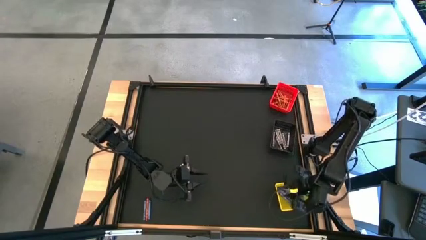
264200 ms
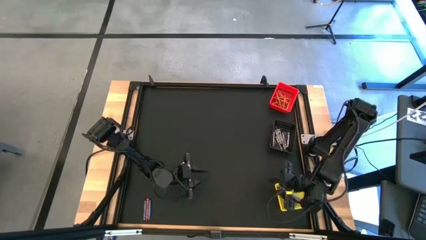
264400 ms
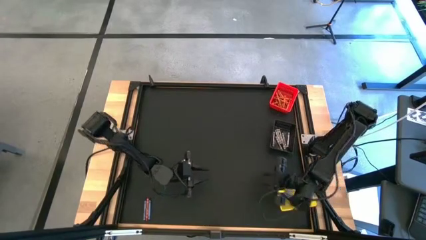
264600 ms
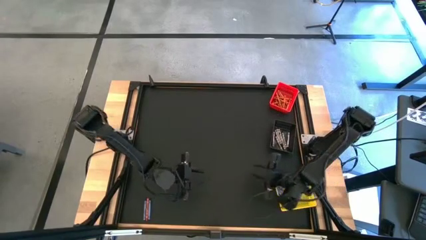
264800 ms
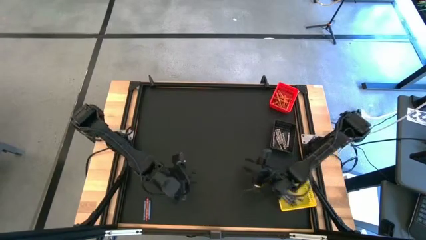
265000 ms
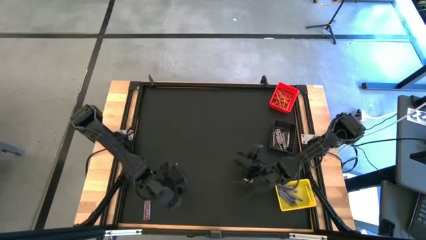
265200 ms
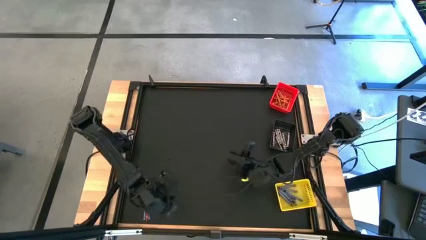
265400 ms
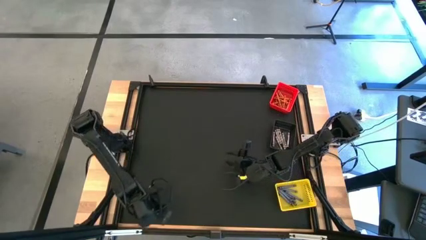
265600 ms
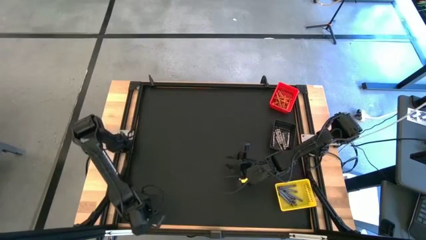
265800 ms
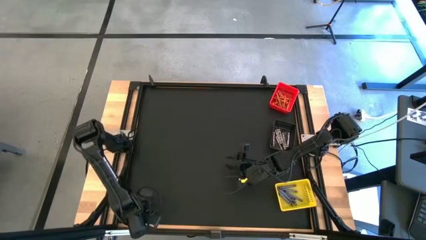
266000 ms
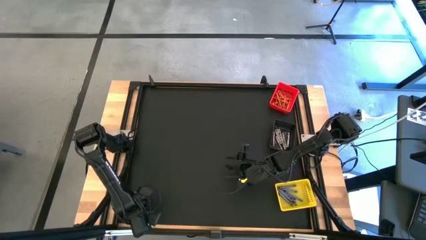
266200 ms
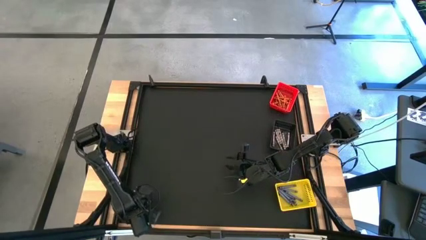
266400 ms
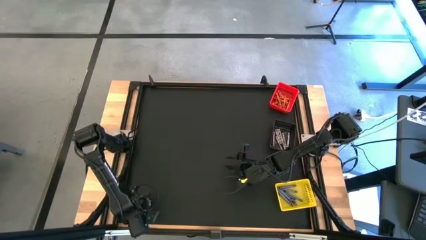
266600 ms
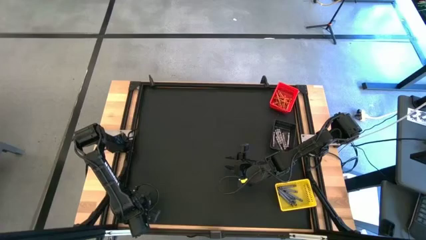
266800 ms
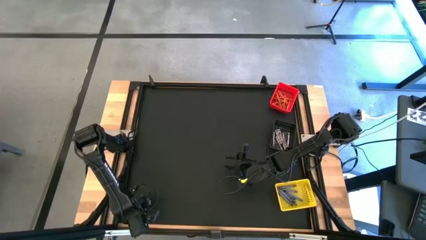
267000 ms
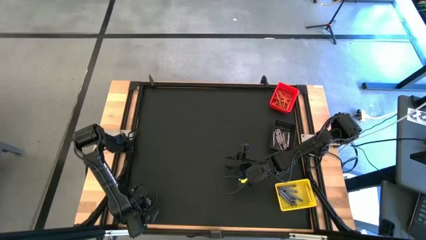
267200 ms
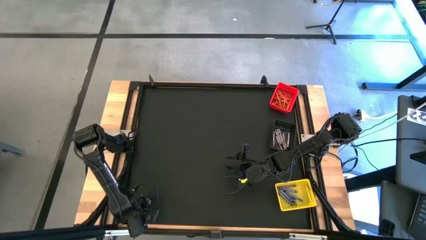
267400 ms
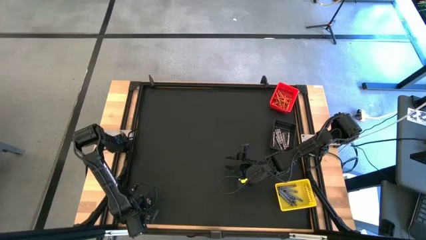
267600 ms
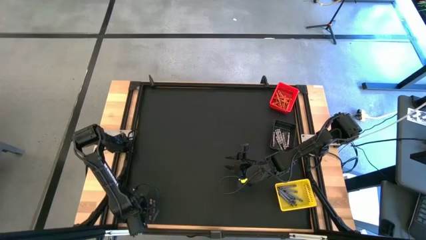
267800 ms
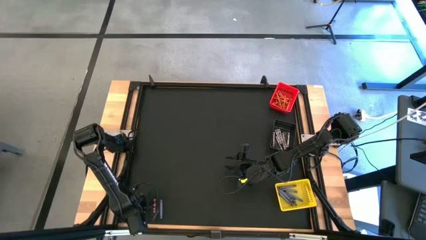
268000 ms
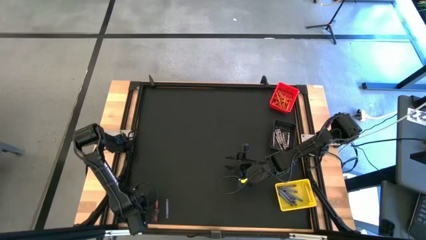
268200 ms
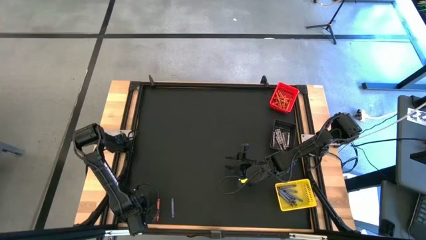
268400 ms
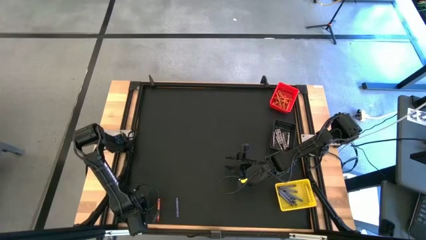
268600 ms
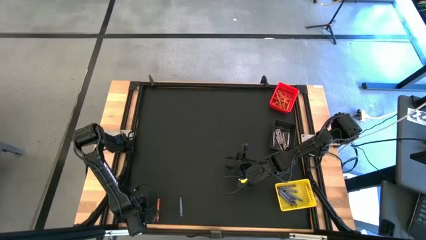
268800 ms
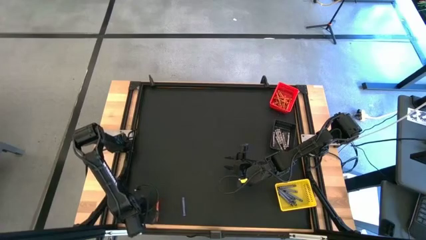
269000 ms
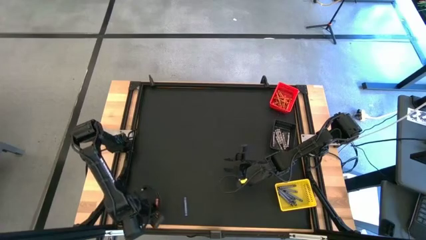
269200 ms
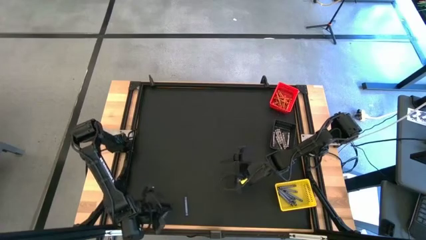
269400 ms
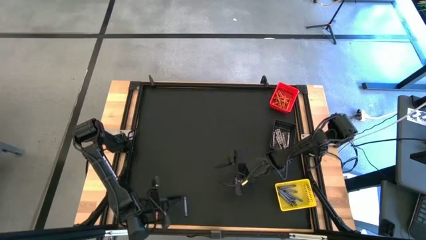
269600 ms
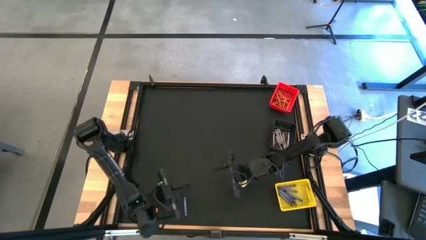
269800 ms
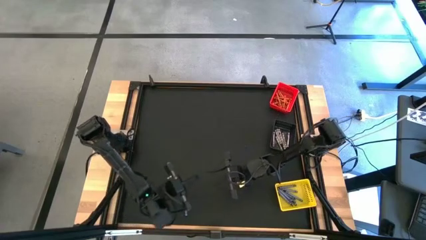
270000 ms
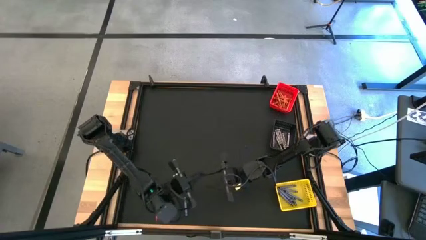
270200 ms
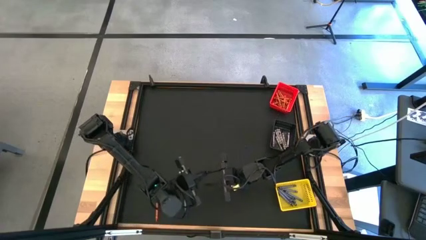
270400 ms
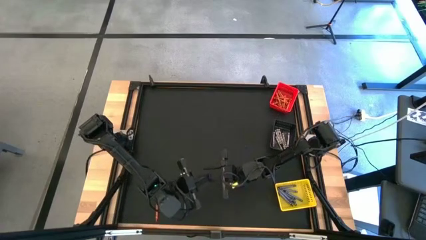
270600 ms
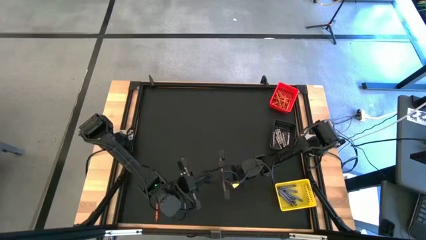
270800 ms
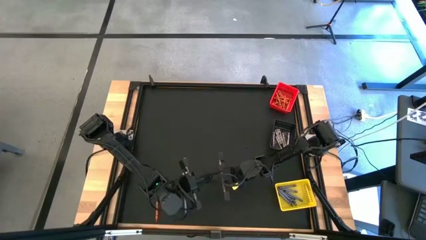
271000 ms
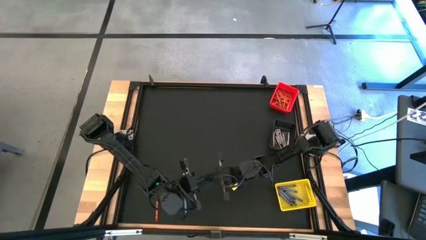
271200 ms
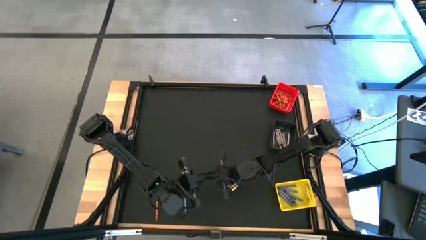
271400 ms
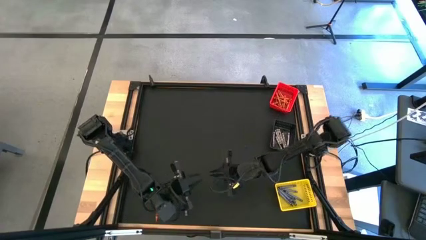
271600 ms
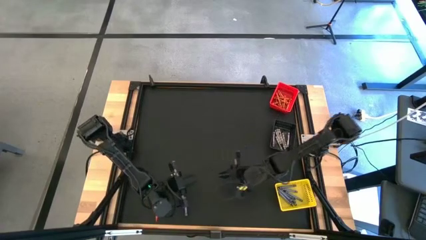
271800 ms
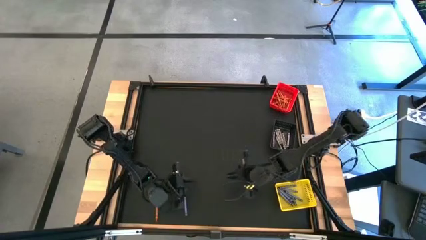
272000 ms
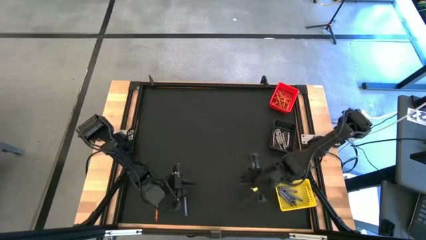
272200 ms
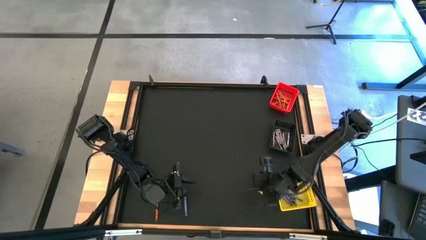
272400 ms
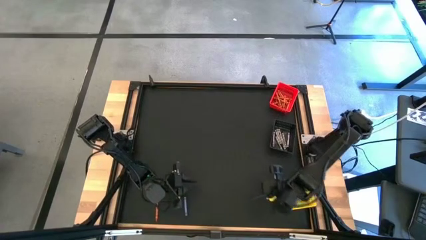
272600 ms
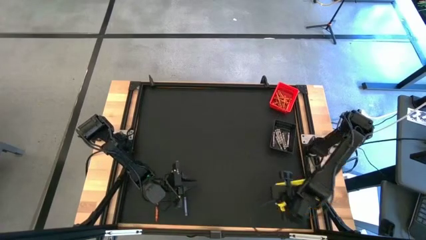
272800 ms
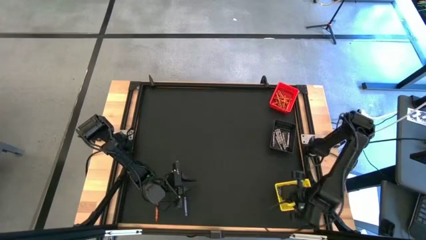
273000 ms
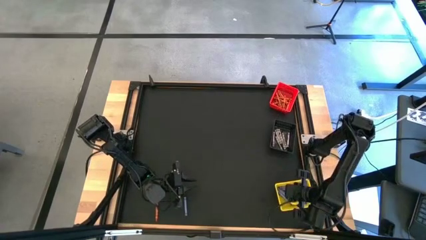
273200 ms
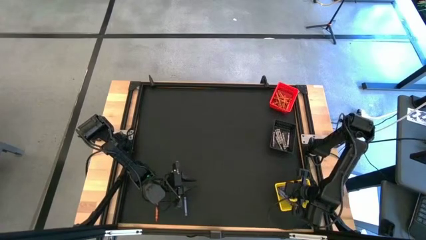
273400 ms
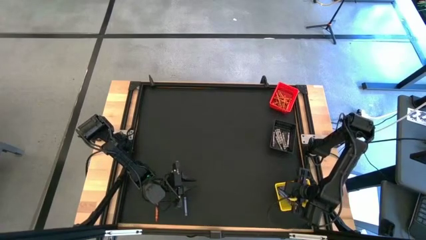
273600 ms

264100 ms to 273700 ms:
Task: Sort crayons
Put the blue crayon into the yellow bin

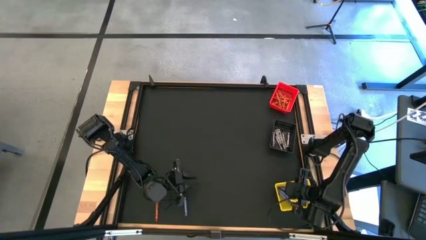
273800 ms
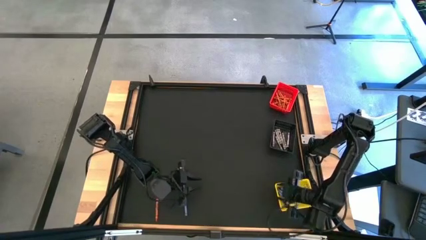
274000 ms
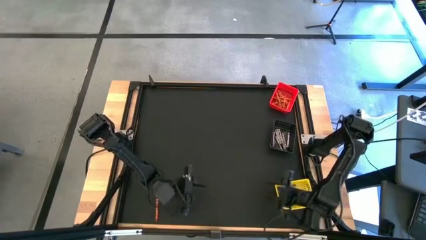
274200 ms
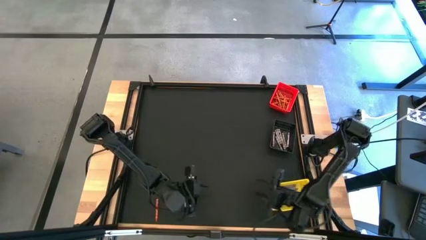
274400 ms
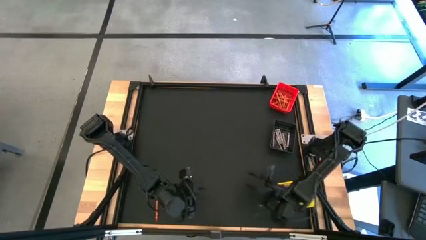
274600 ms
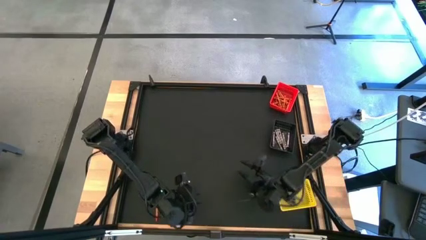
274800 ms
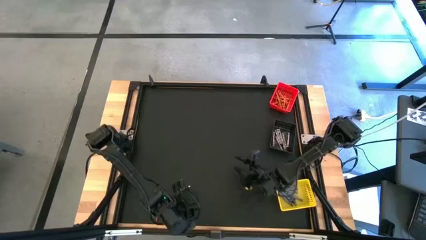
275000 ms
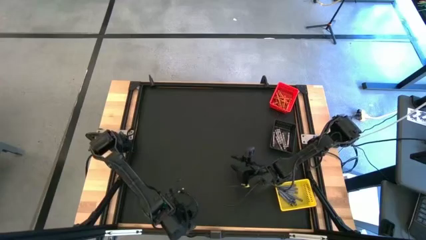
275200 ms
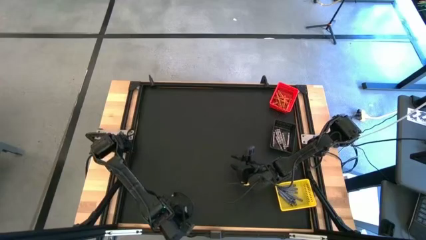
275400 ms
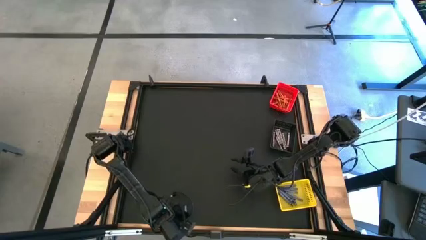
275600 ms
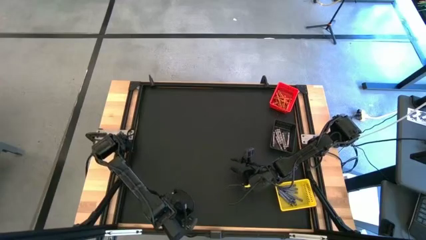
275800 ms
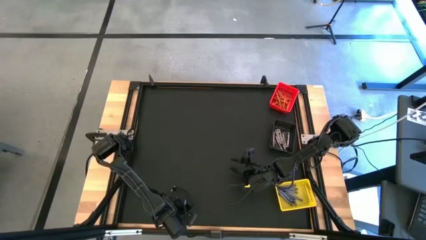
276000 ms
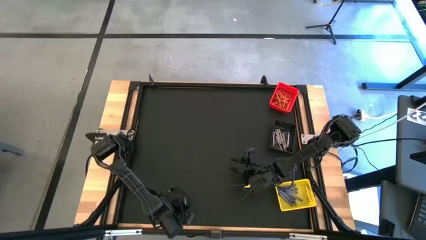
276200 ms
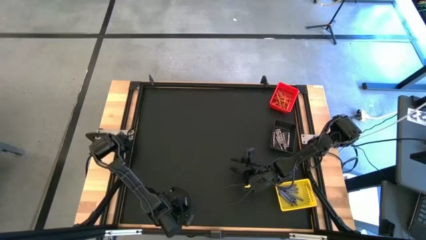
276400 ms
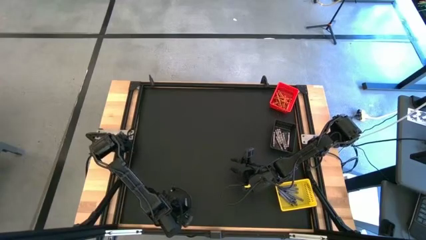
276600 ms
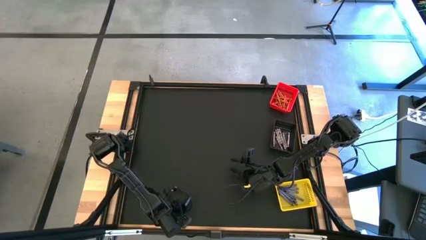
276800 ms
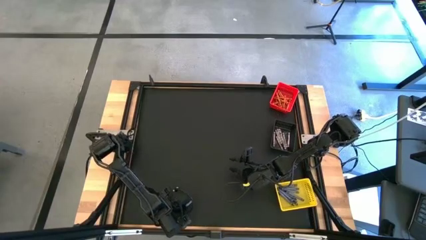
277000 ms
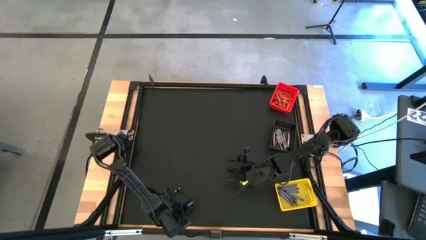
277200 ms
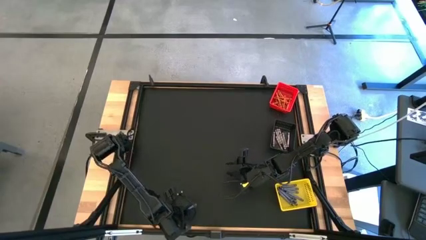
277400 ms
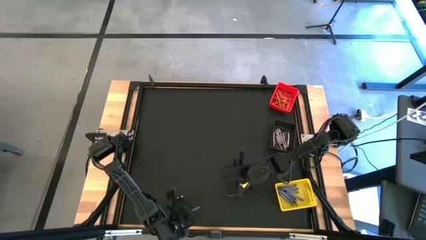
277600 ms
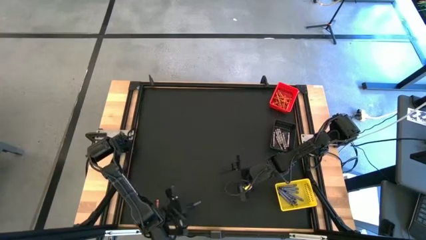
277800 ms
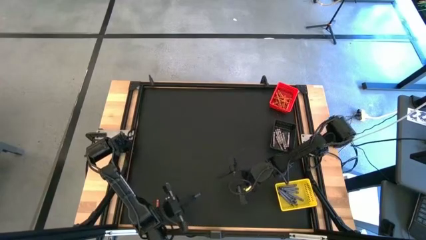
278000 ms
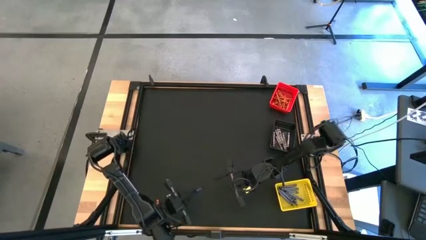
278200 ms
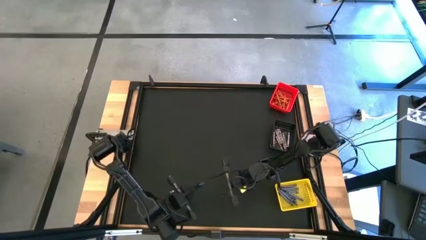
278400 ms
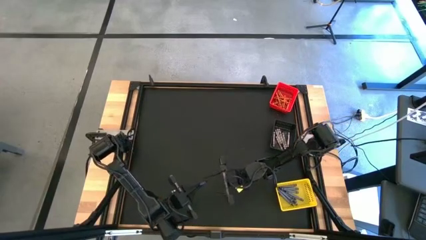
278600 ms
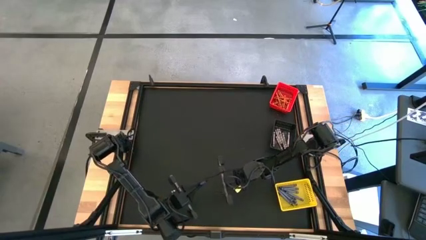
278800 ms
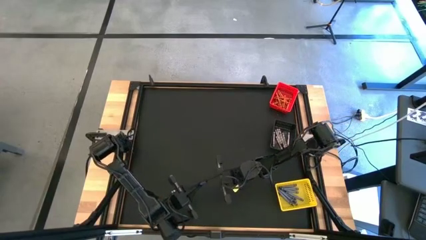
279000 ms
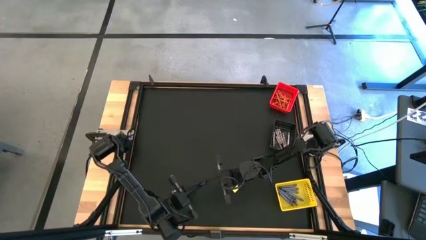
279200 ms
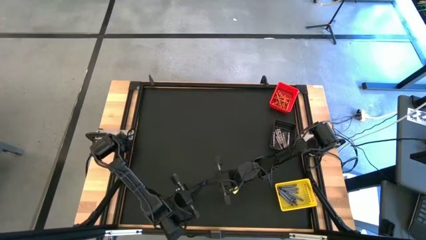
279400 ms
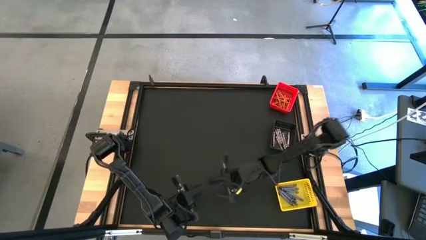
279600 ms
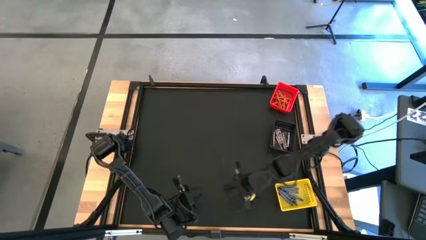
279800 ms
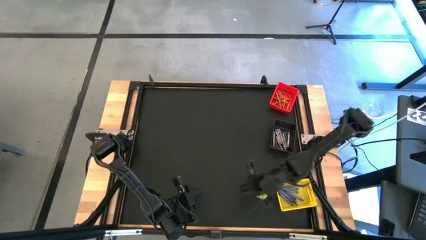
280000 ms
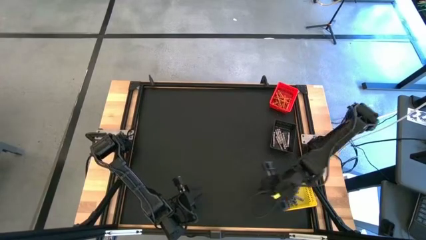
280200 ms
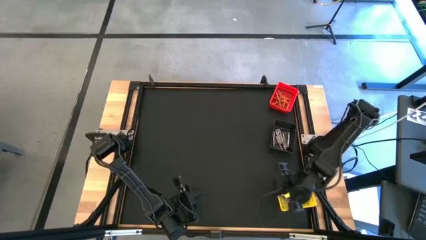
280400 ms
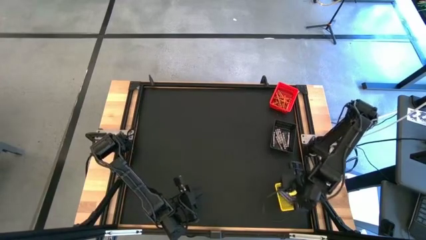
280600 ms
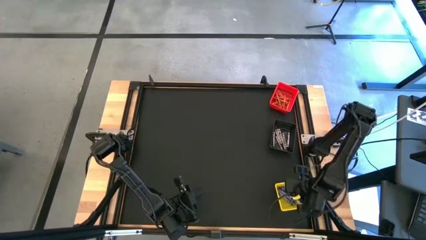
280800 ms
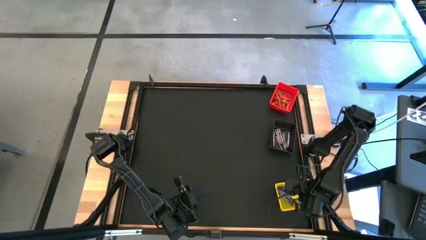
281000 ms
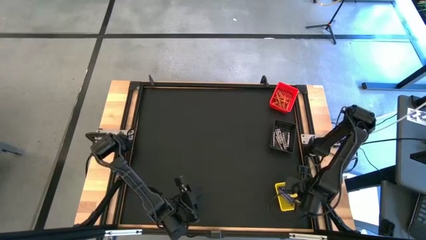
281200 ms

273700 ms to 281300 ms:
Put the blue crayon into the yellow bin
